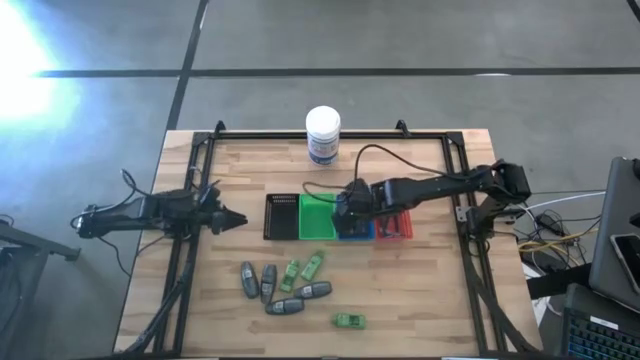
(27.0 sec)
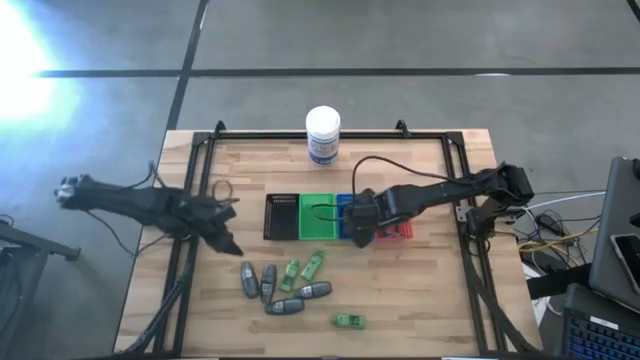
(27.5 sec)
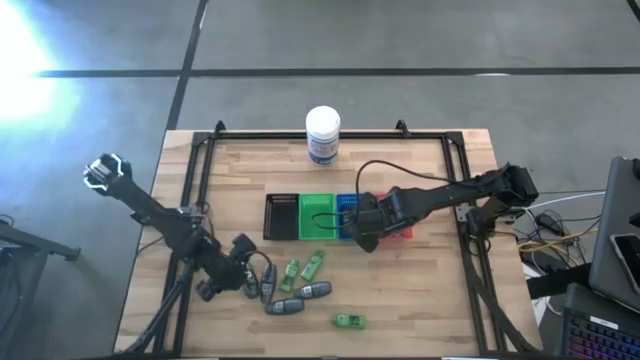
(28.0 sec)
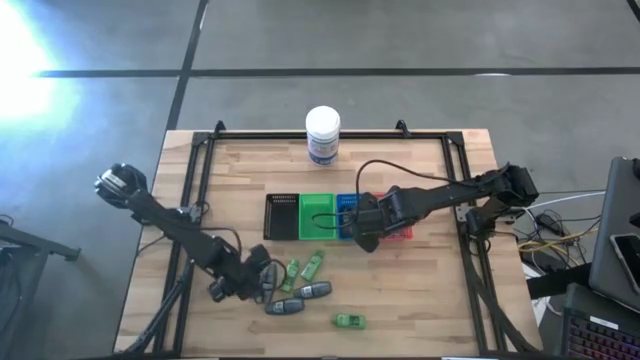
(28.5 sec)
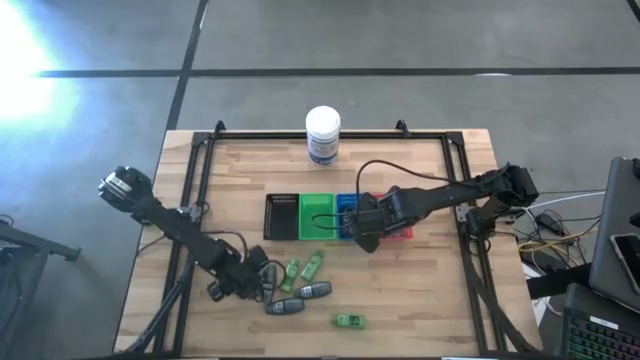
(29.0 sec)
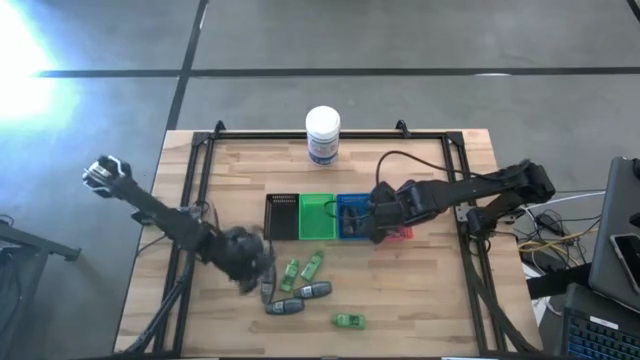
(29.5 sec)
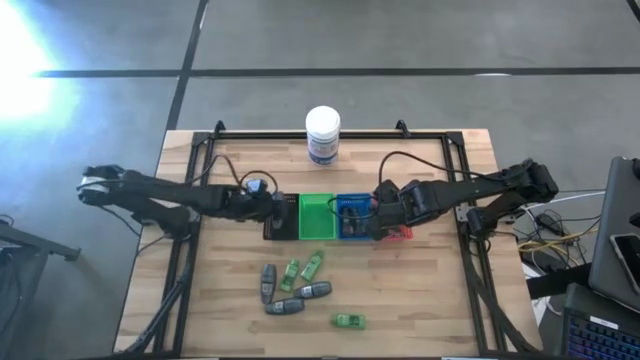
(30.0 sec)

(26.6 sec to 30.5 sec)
Task: Pick & Place Travel size toiletries
Put the gray deodorant into the black bin

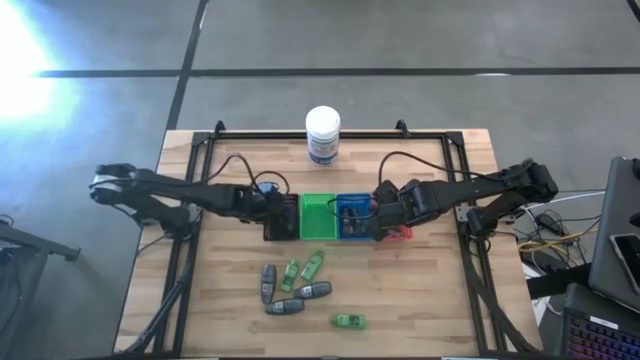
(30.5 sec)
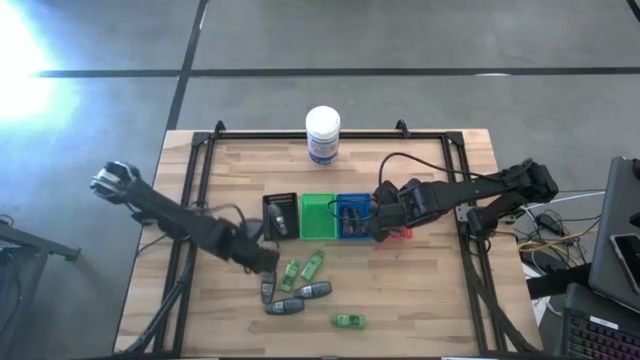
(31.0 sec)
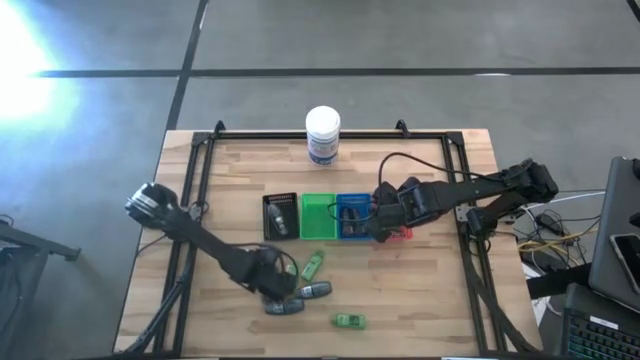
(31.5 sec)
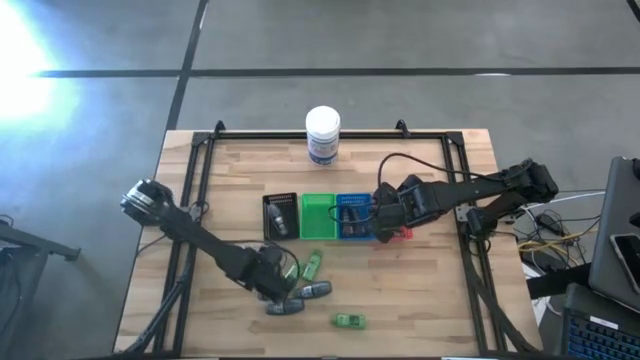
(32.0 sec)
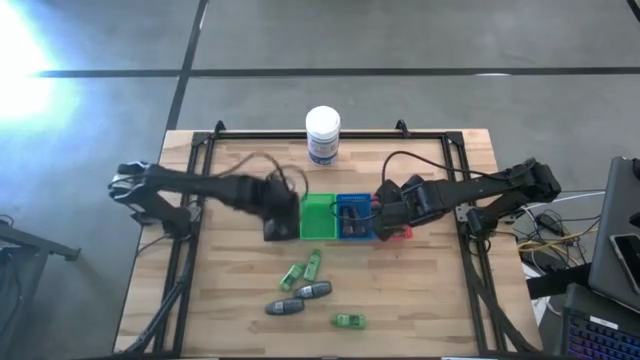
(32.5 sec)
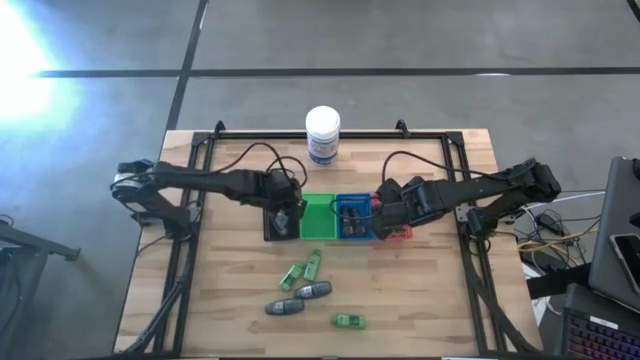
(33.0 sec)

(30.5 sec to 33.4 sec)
Put the gray deodorant into the black bin

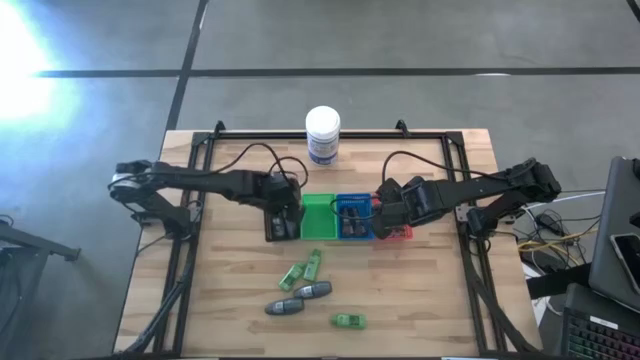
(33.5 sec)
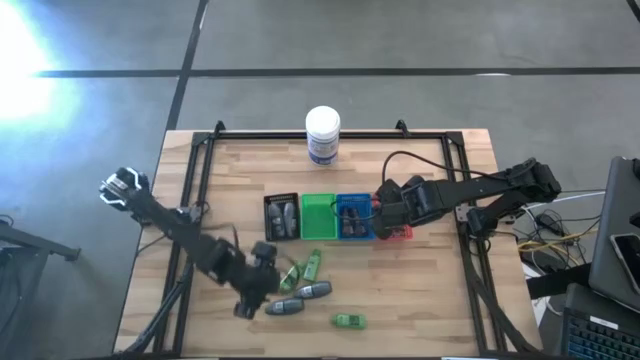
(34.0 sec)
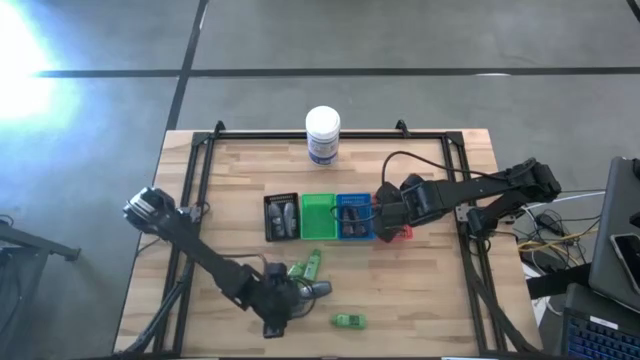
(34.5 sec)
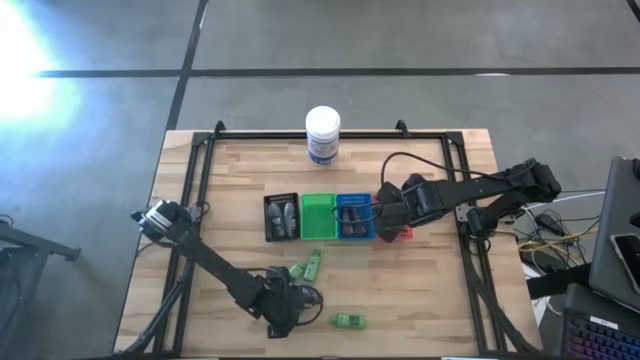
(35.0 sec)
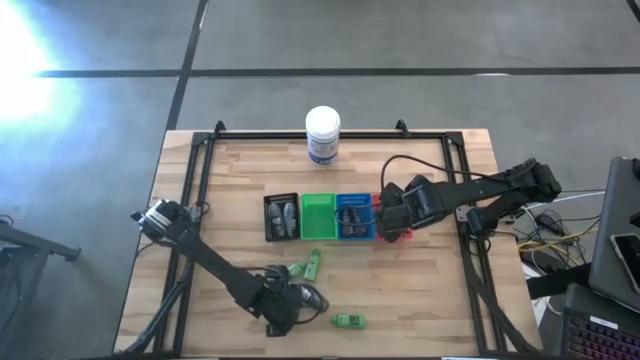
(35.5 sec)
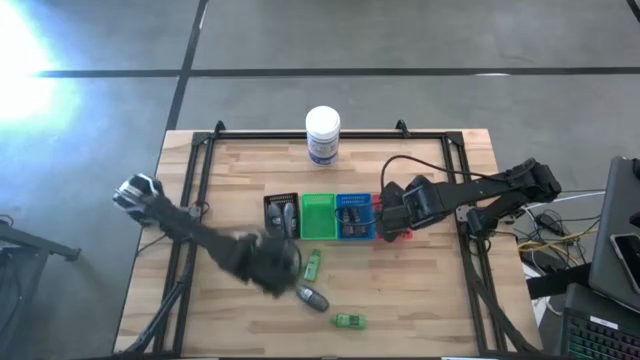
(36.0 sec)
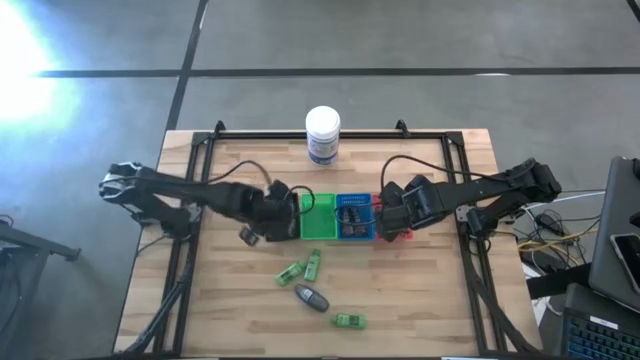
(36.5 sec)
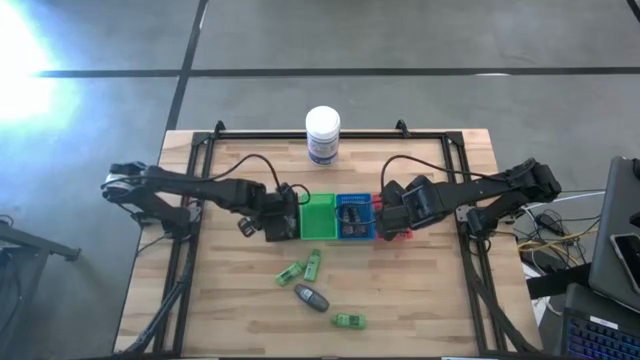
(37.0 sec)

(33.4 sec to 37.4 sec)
Put the gray deodorant into the black bin

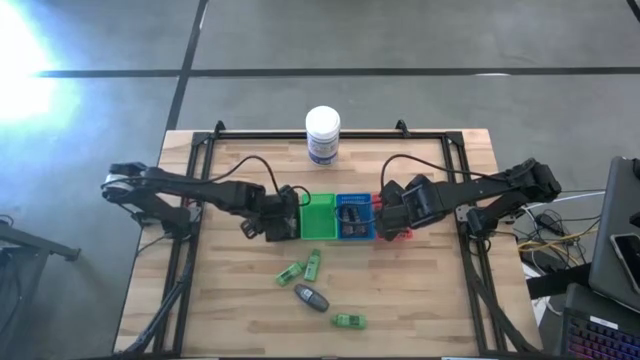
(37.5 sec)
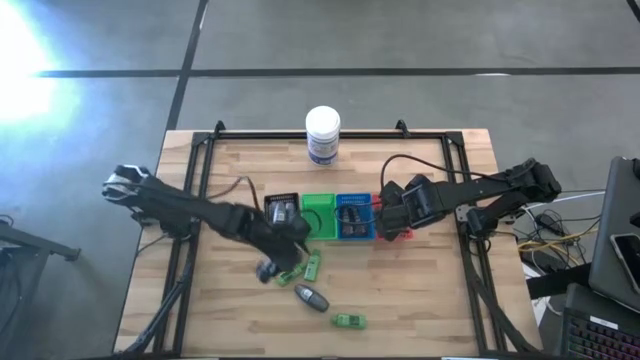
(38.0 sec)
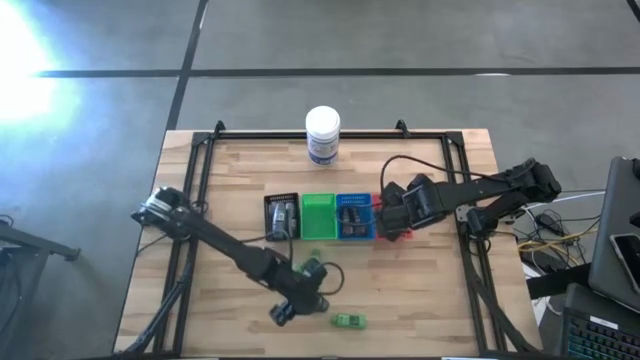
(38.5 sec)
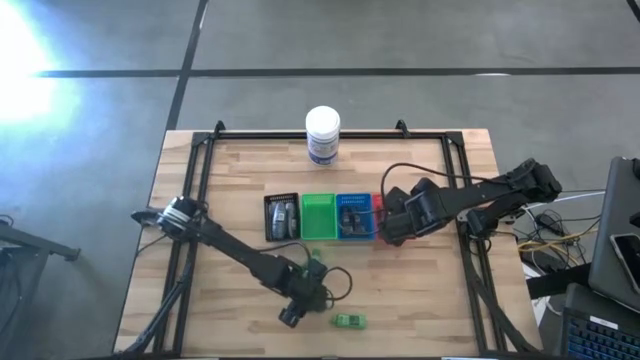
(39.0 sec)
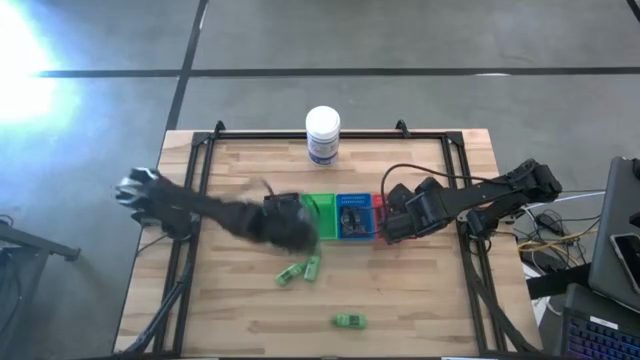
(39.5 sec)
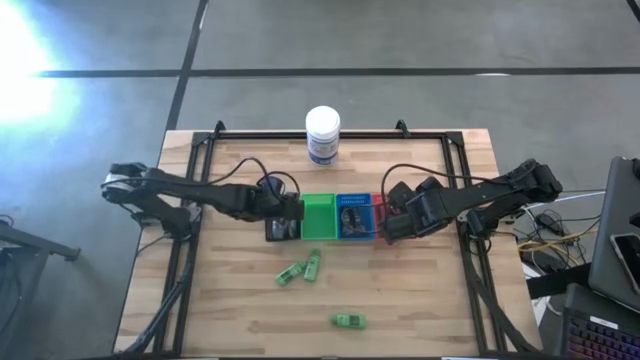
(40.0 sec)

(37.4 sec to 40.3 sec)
Put the gray deodorant into the black bin

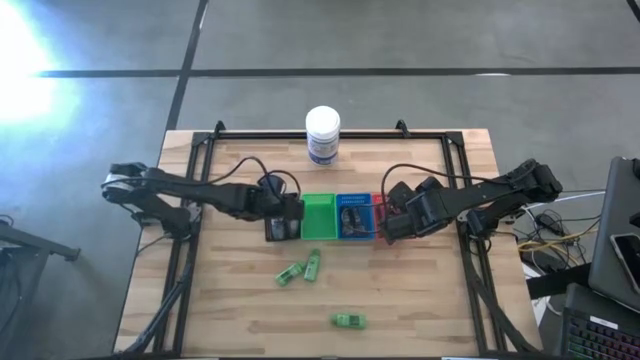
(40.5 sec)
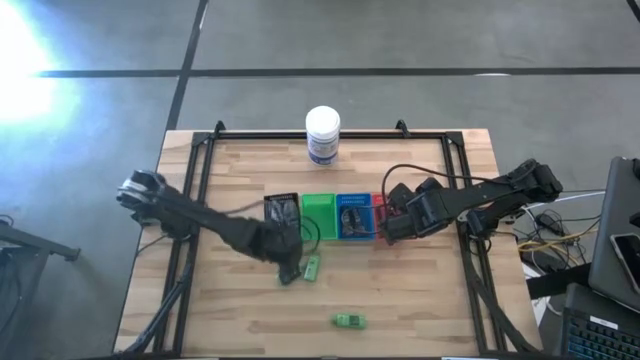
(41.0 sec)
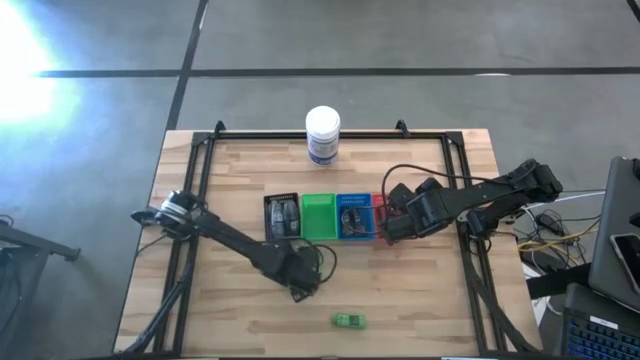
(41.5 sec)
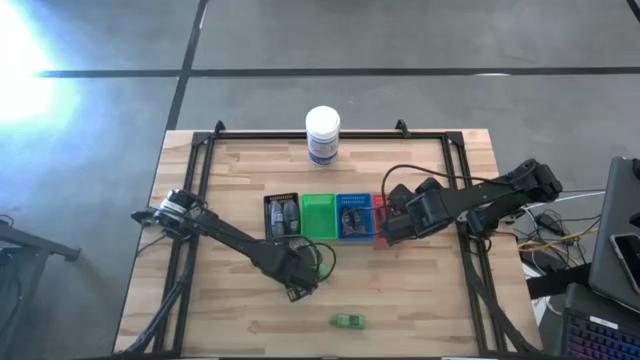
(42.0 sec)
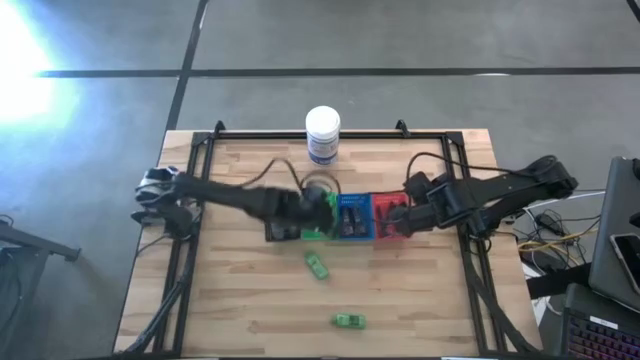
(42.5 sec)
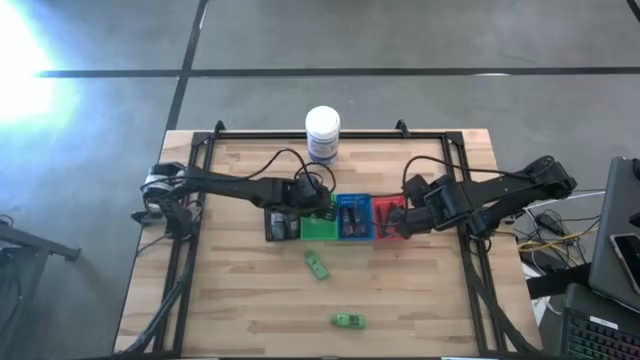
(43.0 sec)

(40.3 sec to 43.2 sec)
Put the green shampoo into the green bin

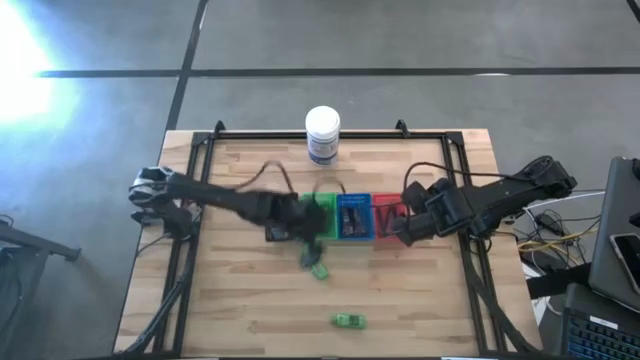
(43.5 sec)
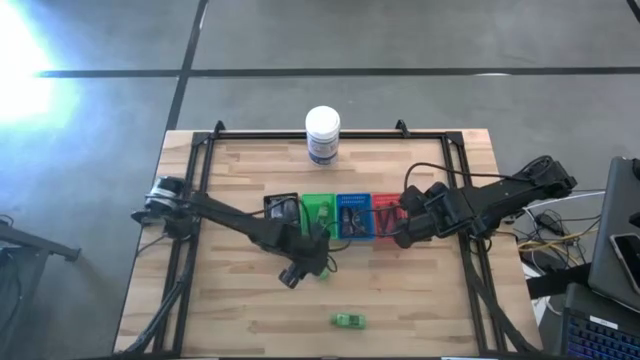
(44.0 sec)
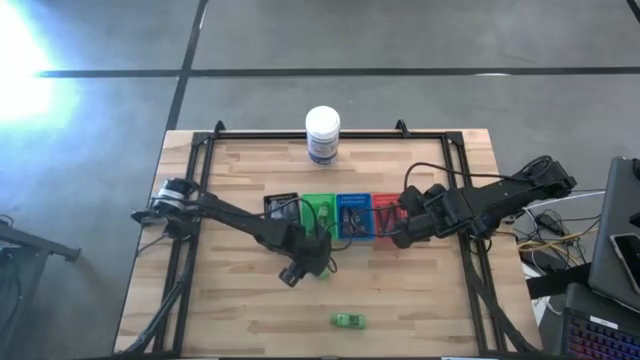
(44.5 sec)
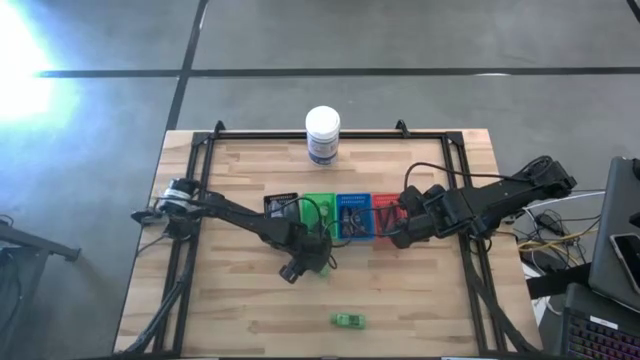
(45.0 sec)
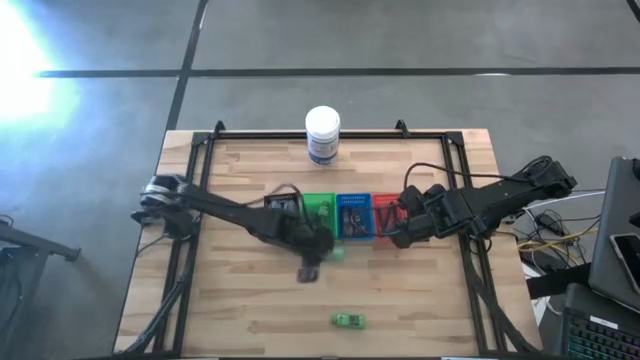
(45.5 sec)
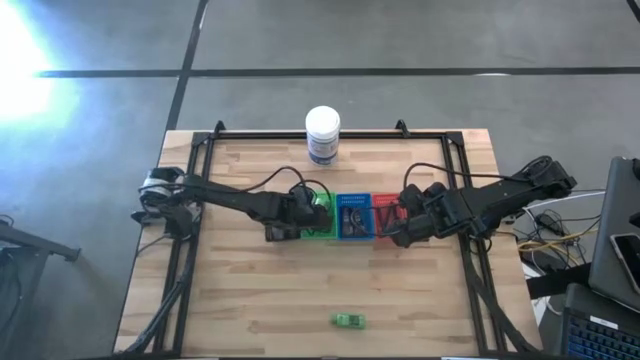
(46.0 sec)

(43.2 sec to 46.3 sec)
Put the green shampoo into the green bin

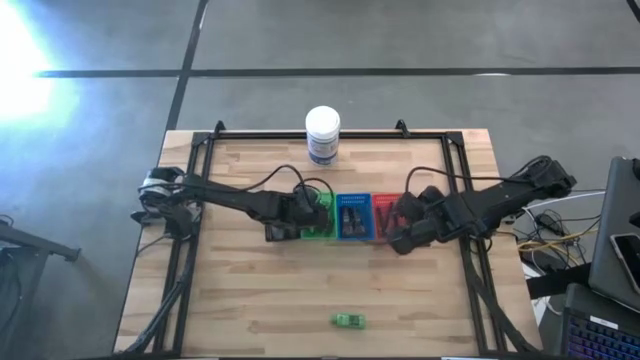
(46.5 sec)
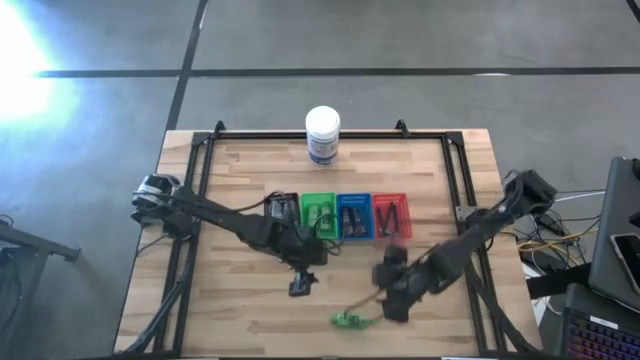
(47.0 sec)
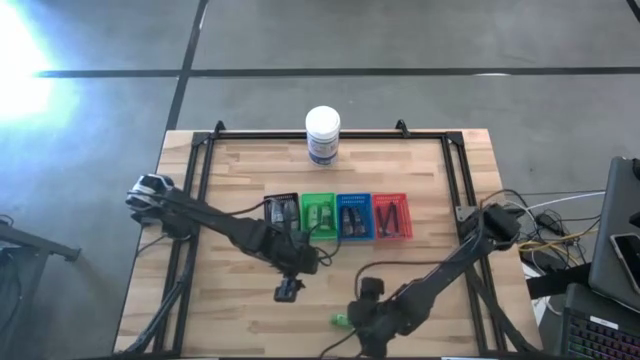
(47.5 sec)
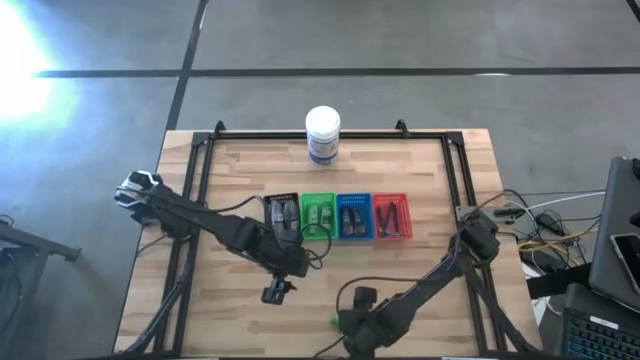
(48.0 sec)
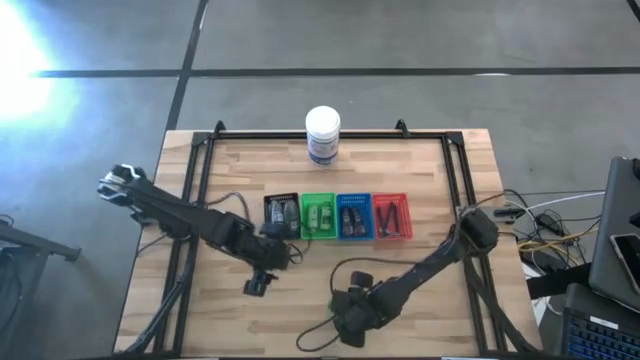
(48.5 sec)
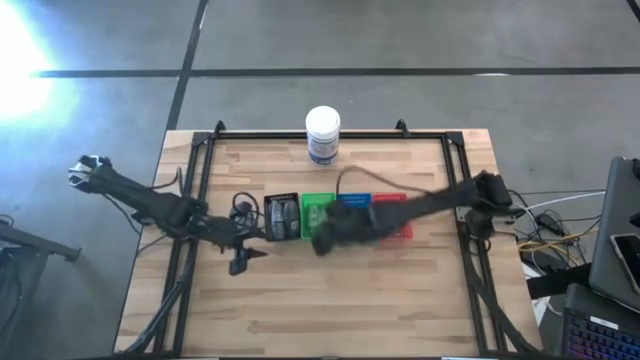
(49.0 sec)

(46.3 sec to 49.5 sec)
Put the green shampoo into the green bin
